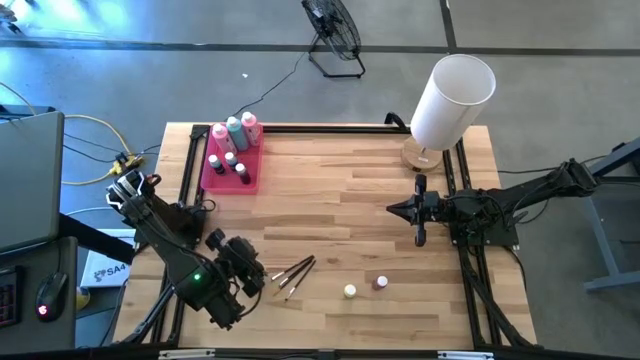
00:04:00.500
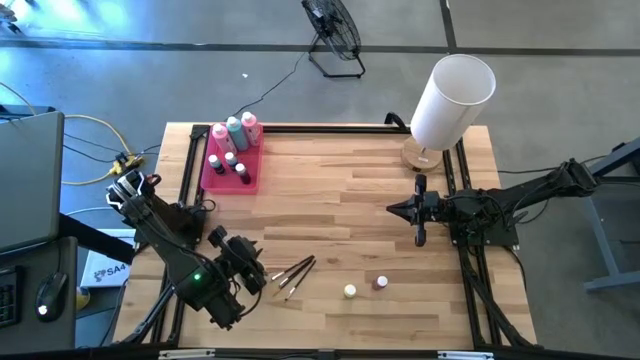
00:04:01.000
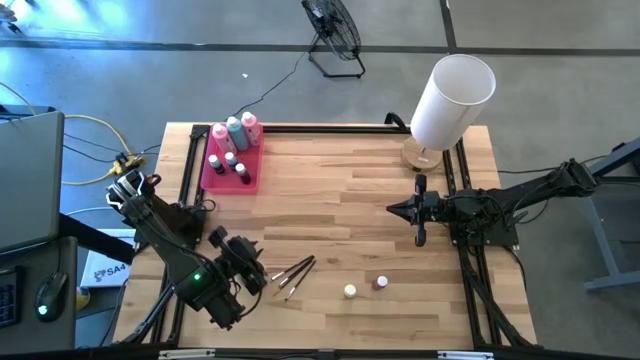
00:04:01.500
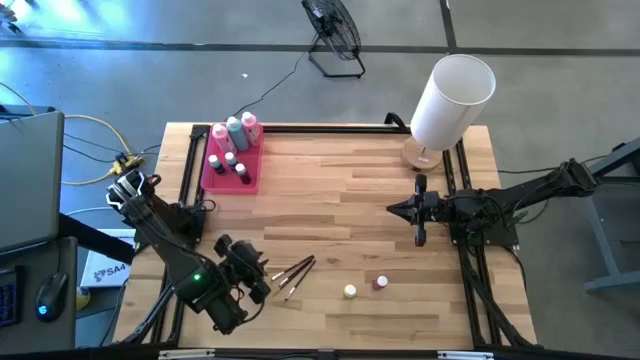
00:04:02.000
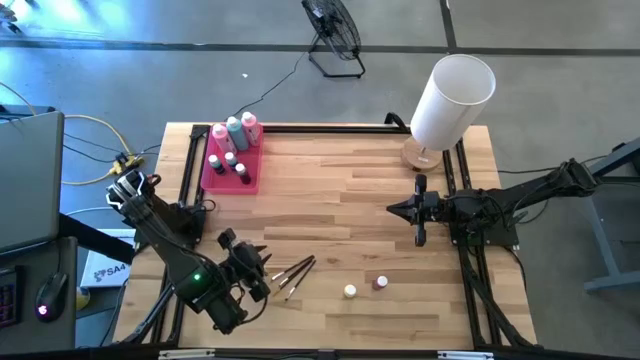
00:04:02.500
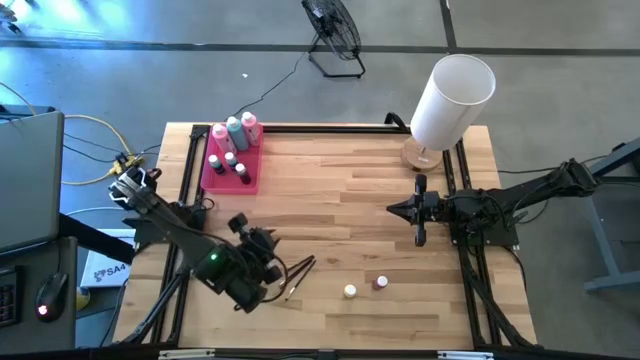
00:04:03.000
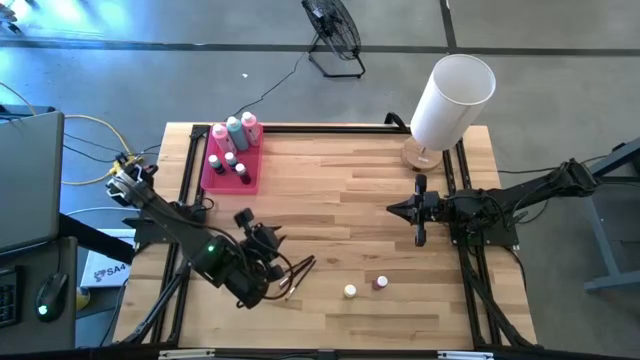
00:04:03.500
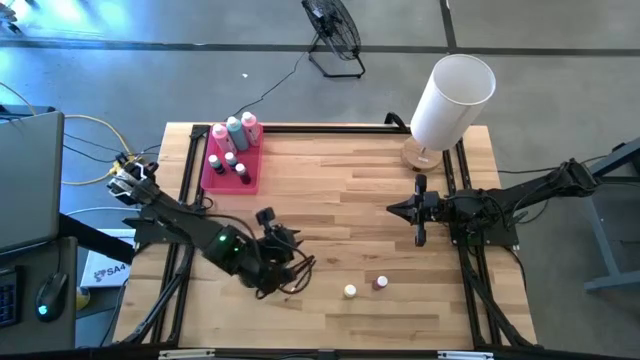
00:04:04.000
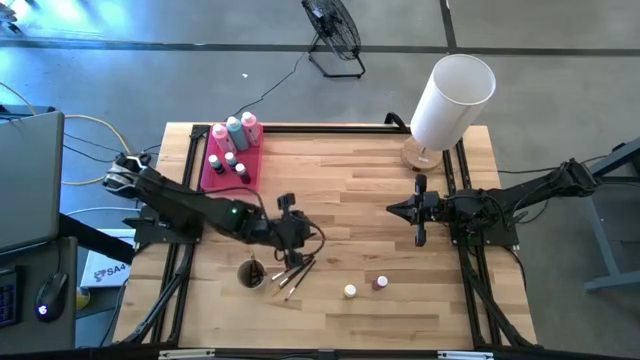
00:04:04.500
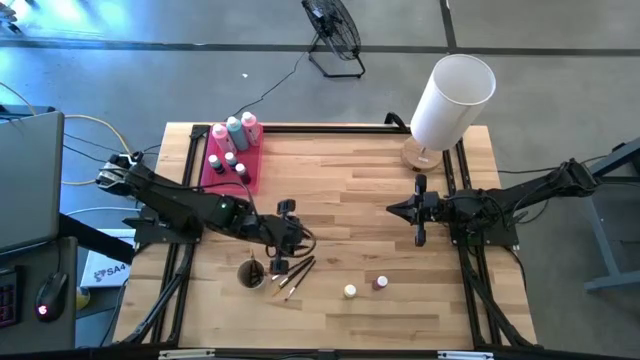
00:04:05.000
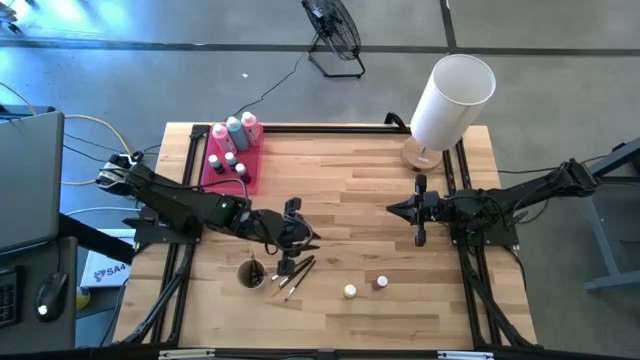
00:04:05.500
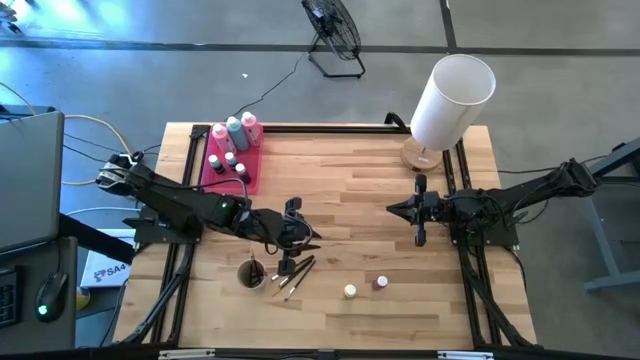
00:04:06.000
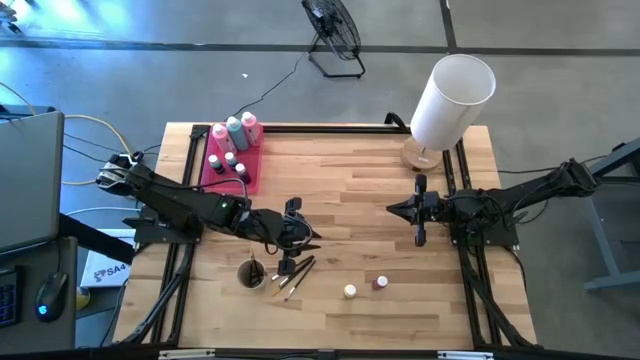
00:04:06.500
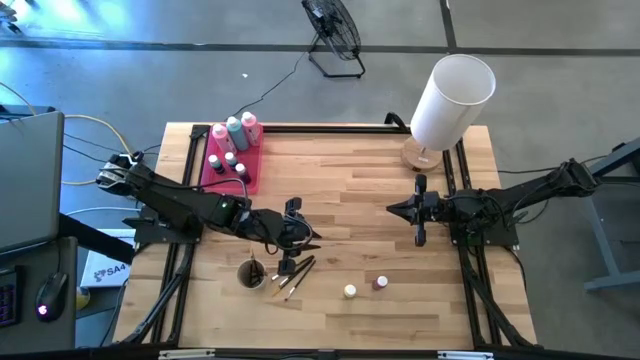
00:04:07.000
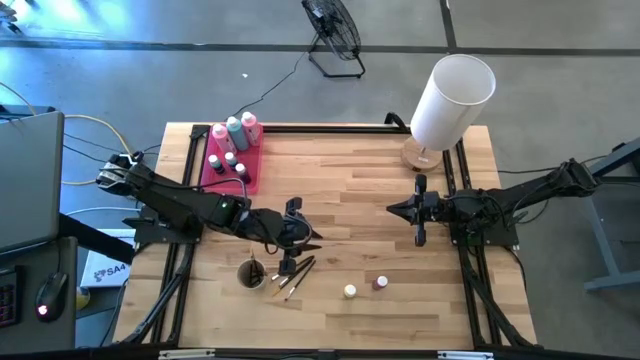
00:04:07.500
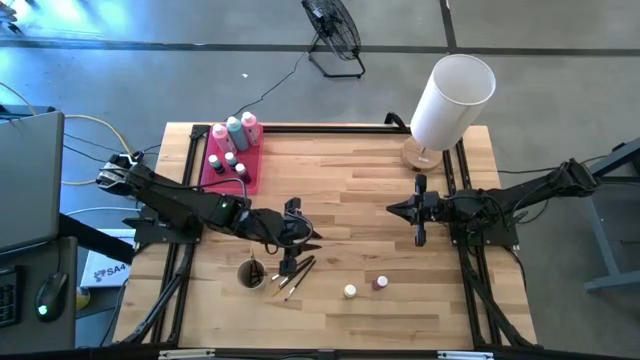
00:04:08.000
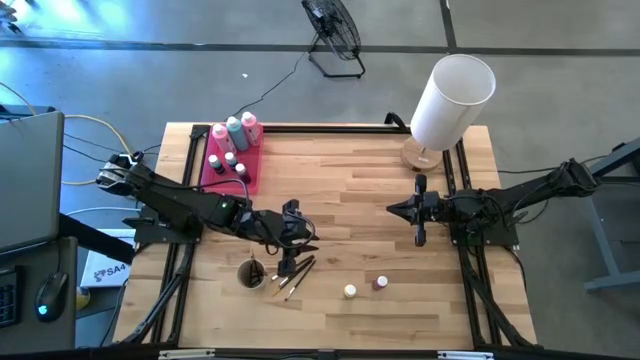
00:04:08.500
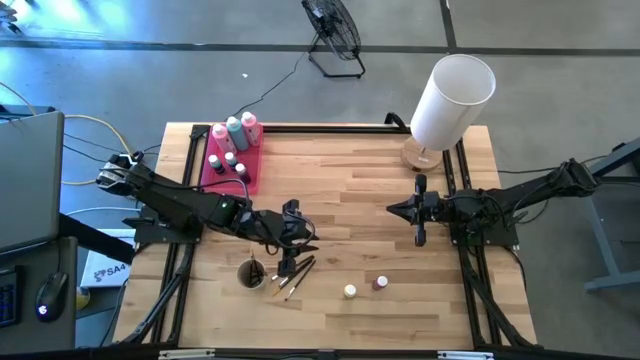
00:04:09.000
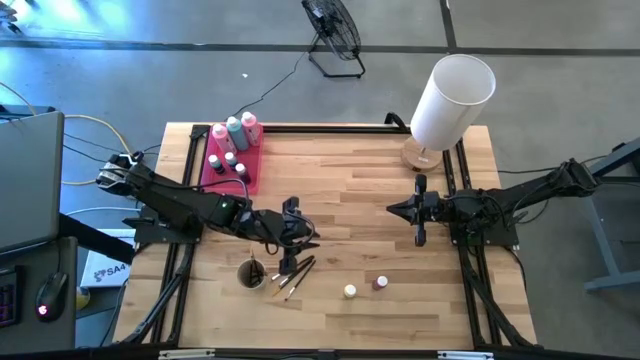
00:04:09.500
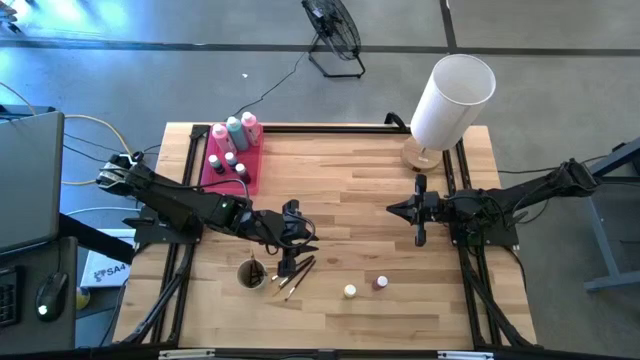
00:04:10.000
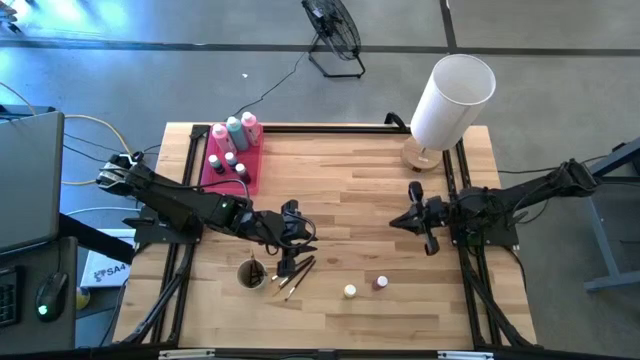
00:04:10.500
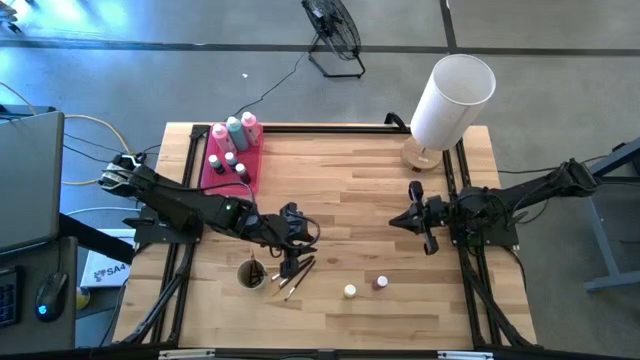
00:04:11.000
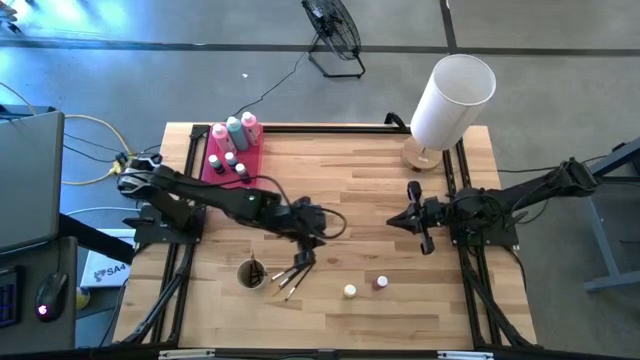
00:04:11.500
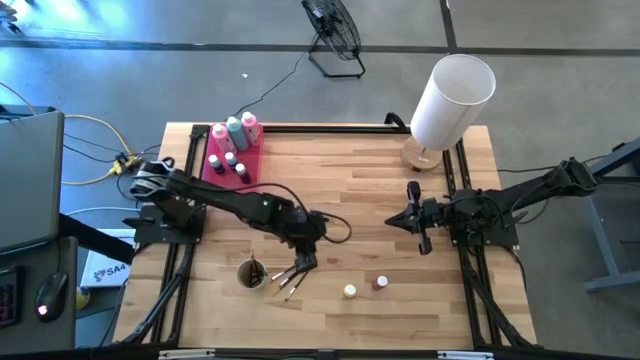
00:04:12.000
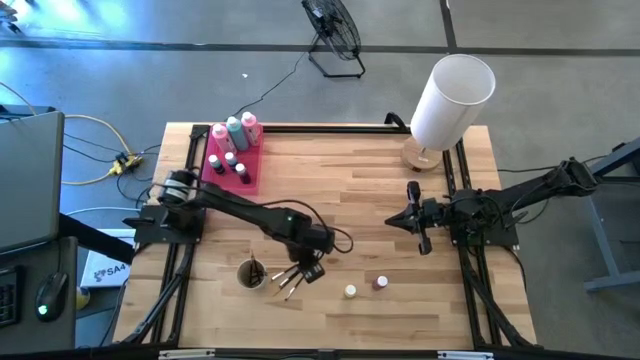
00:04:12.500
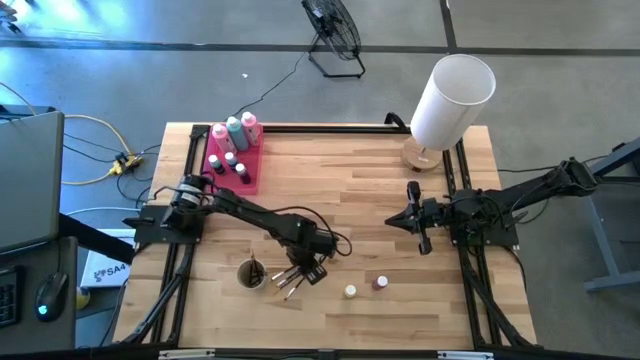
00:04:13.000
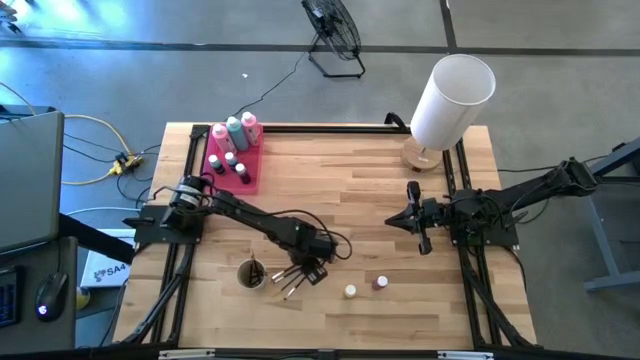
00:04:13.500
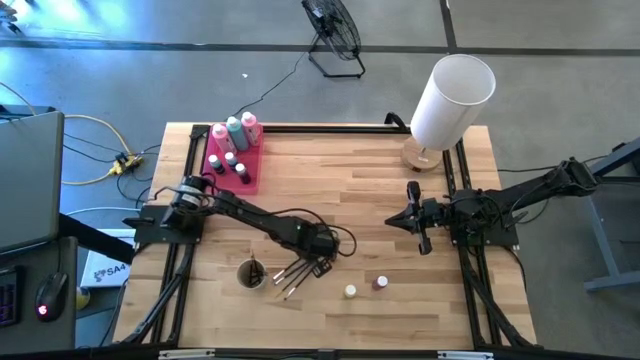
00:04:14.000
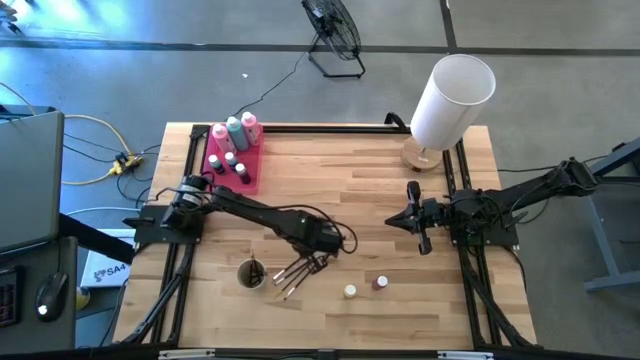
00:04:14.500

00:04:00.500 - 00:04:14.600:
Task: Pick & Place Paint Supplies
Put the silver paintbrush into the light brown cup

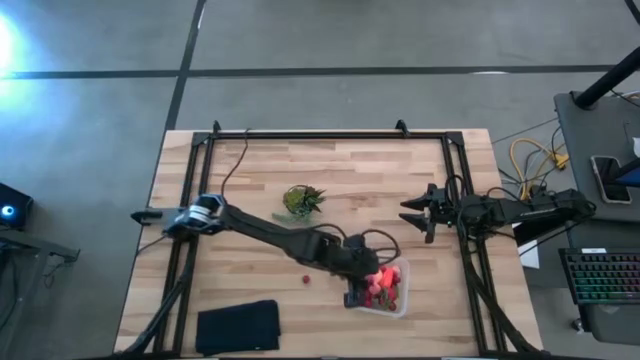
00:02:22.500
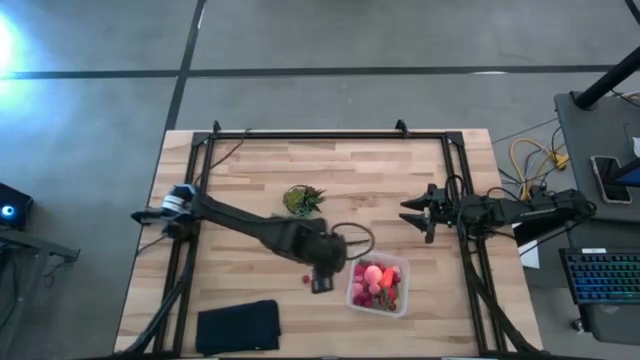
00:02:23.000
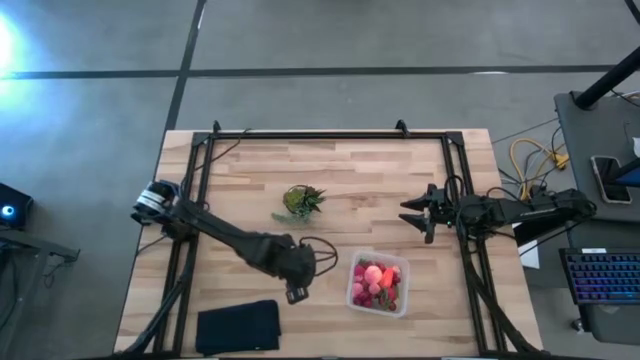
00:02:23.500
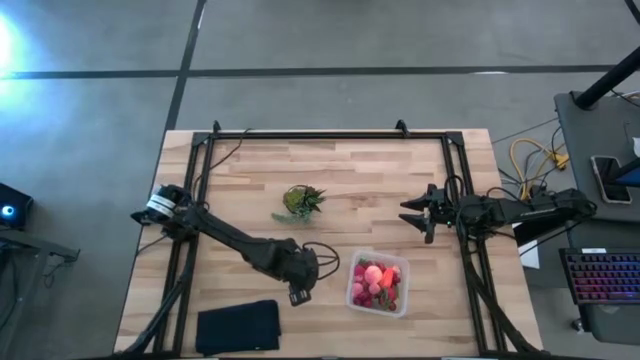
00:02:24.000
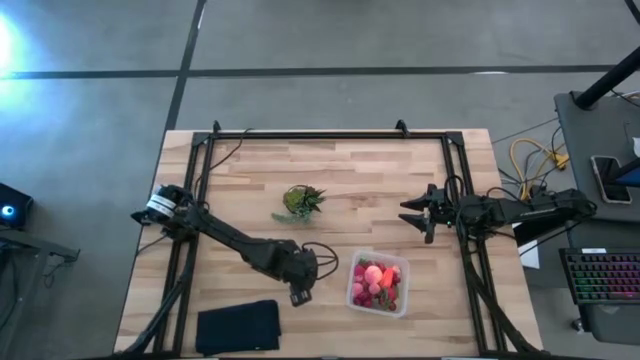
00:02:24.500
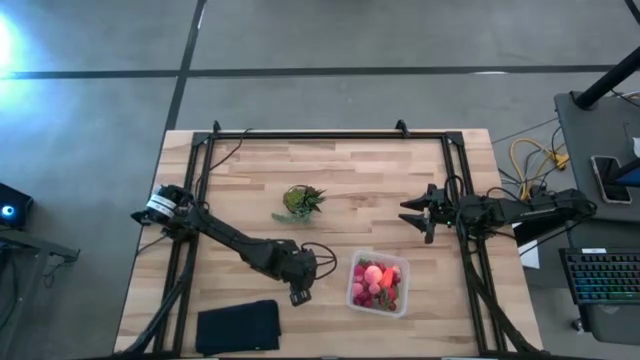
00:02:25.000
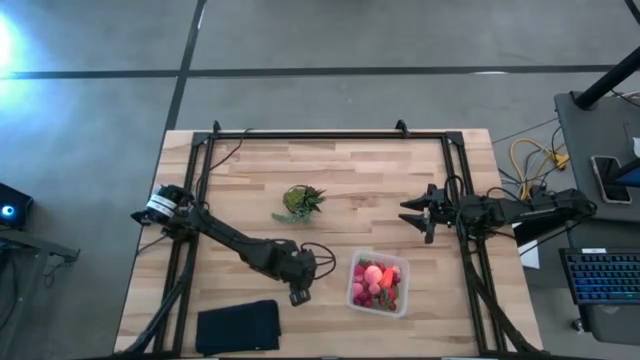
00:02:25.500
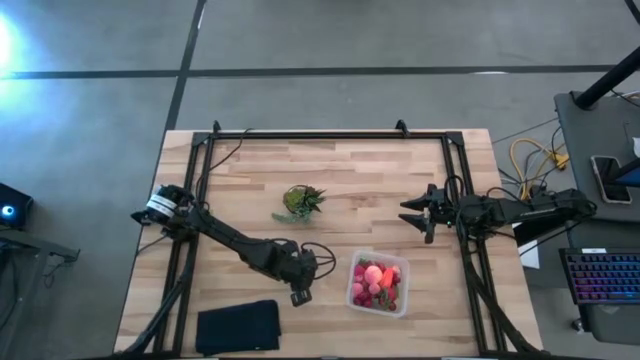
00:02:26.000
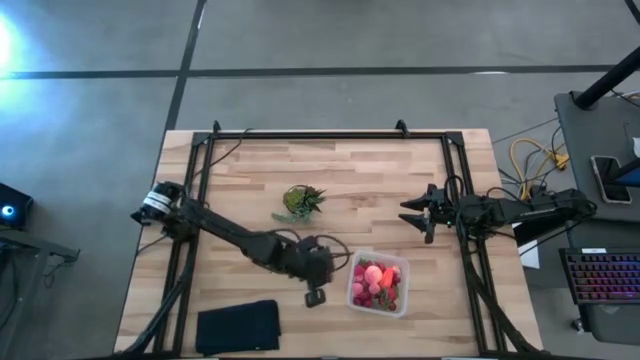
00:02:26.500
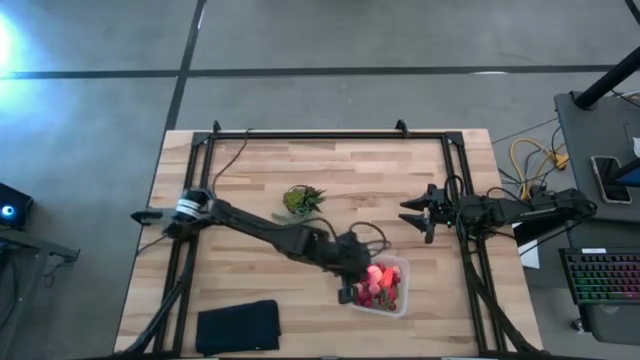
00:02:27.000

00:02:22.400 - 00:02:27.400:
Task: Pick and placing Produce into tupperware
Put the cherry into the bin

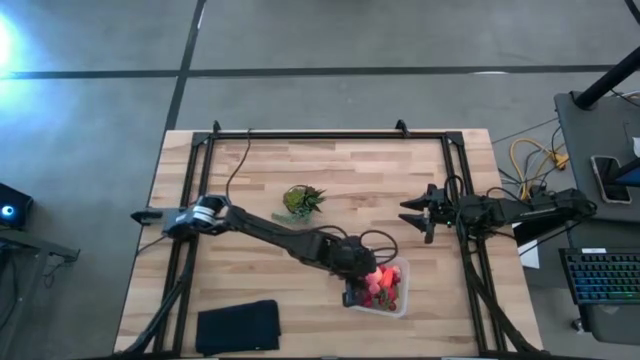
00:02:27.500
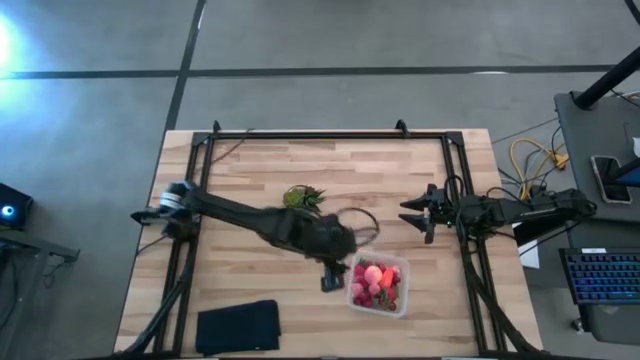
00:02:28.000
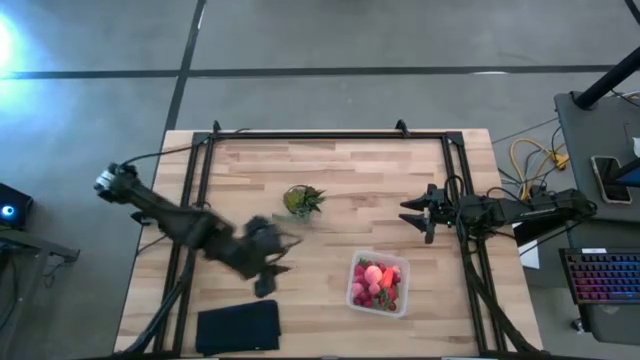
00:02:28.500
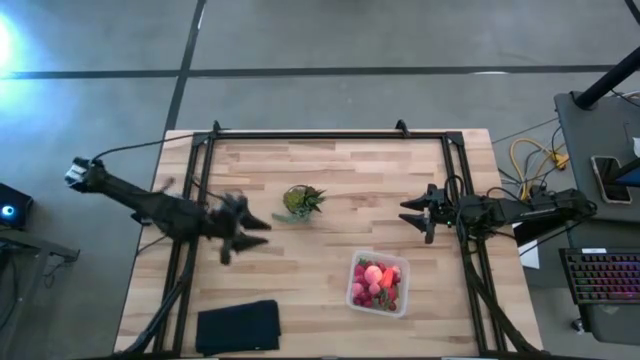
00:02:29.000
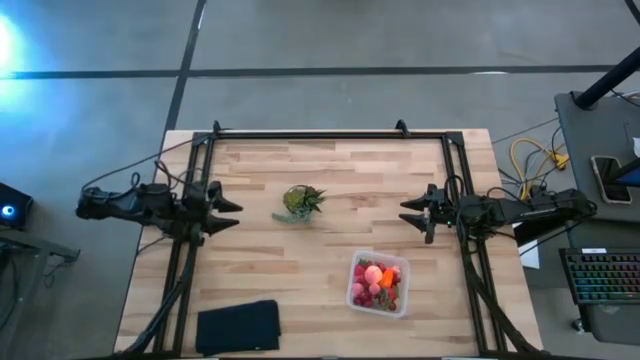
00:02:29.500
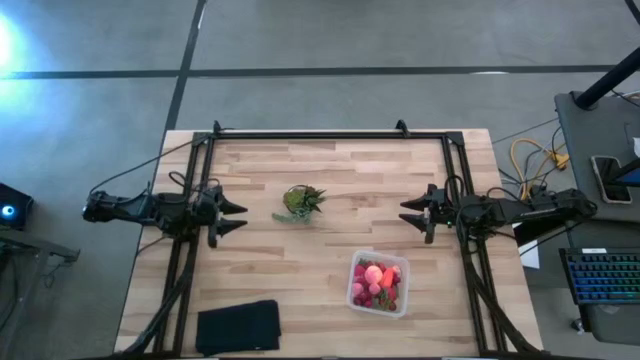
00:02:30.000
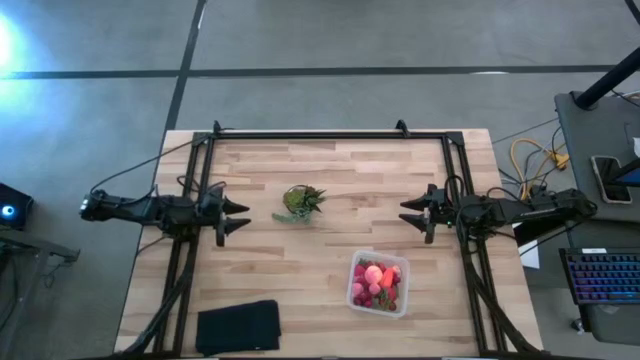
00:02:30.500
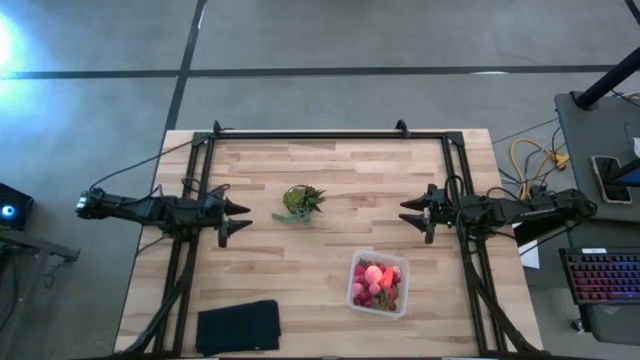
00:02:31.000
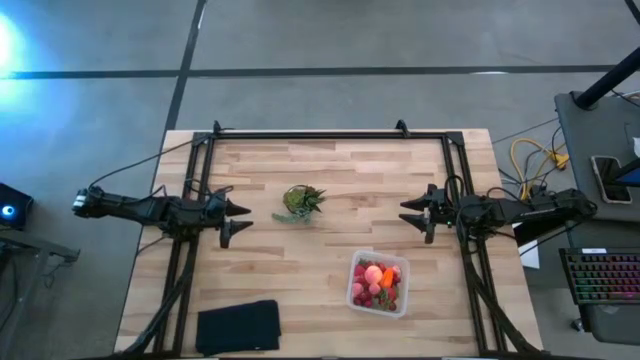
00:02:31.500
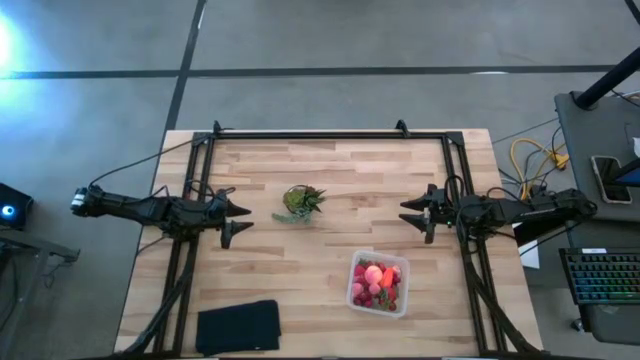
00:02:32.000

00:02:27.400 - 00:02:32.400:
Return to Home Position
